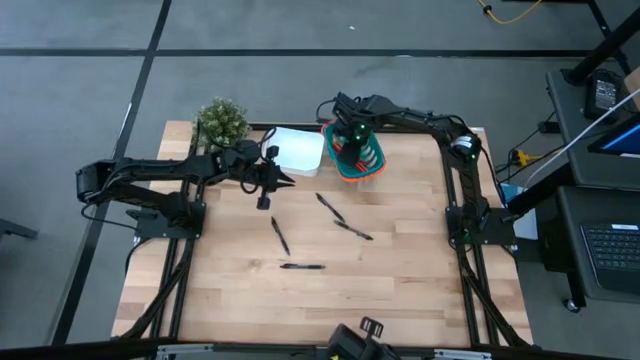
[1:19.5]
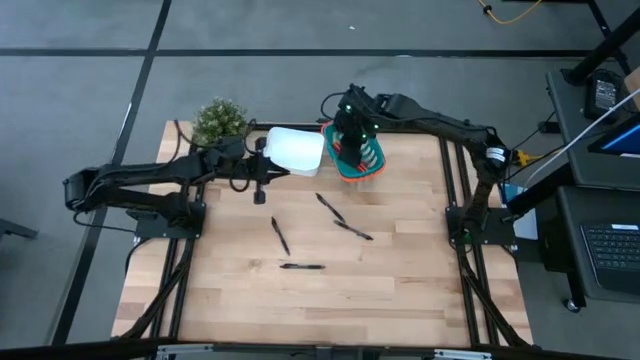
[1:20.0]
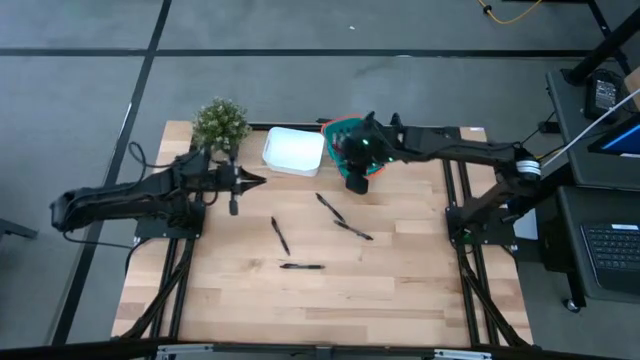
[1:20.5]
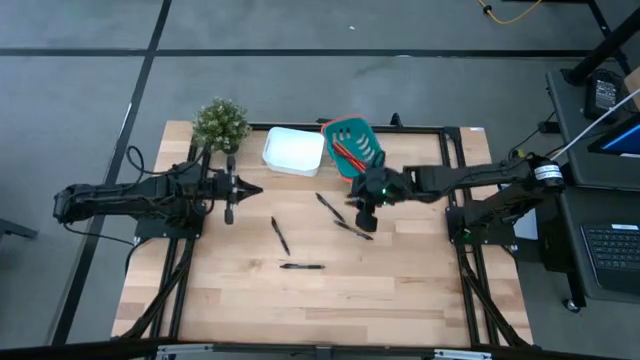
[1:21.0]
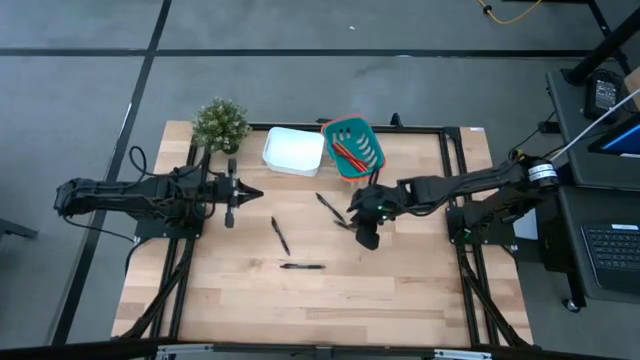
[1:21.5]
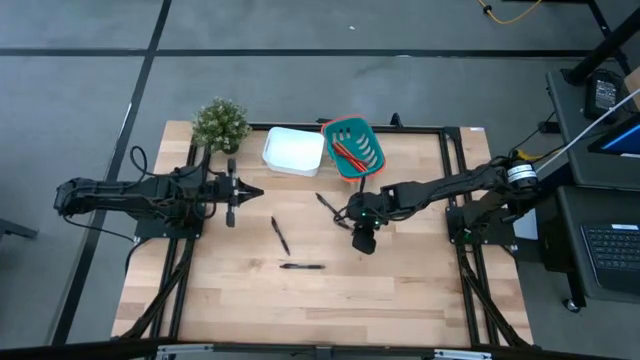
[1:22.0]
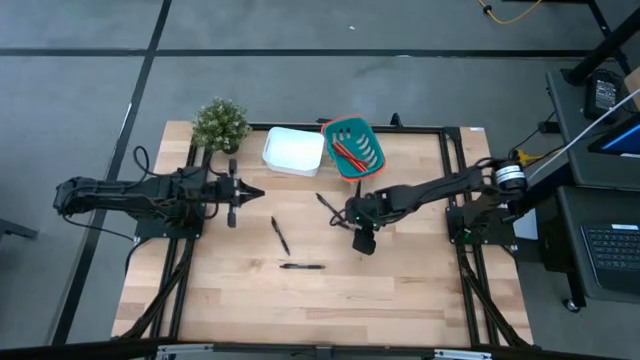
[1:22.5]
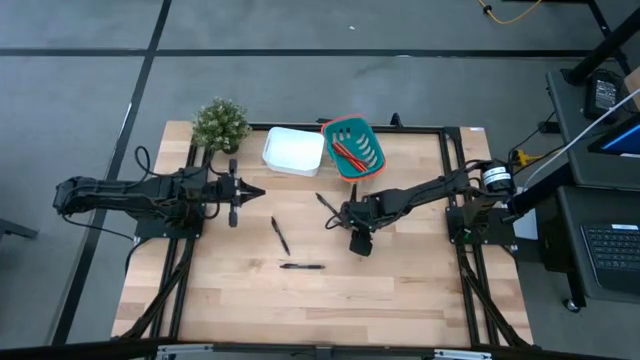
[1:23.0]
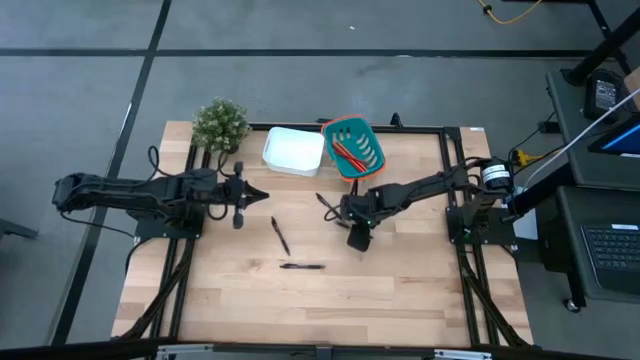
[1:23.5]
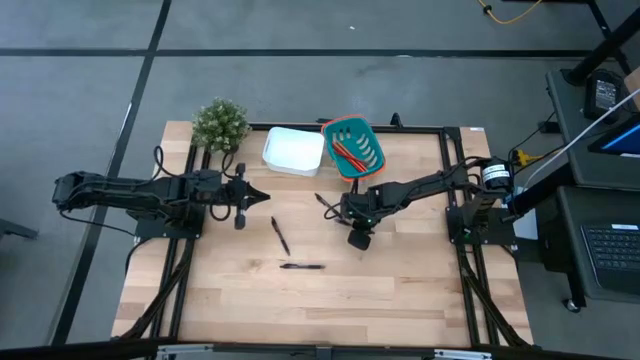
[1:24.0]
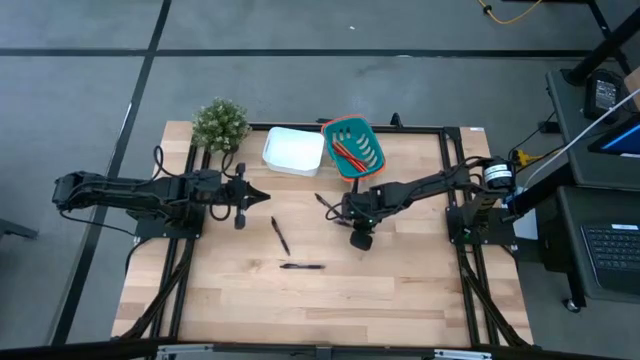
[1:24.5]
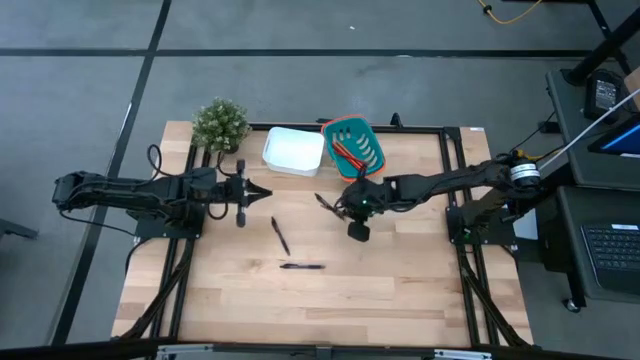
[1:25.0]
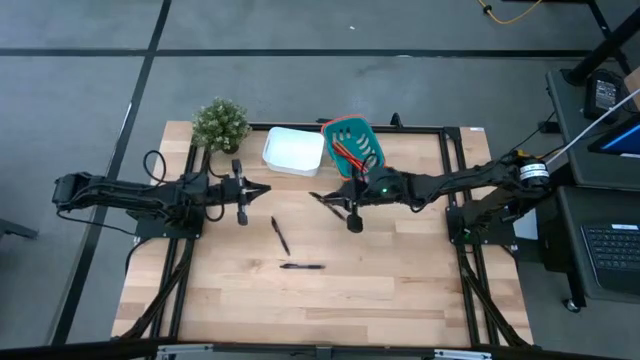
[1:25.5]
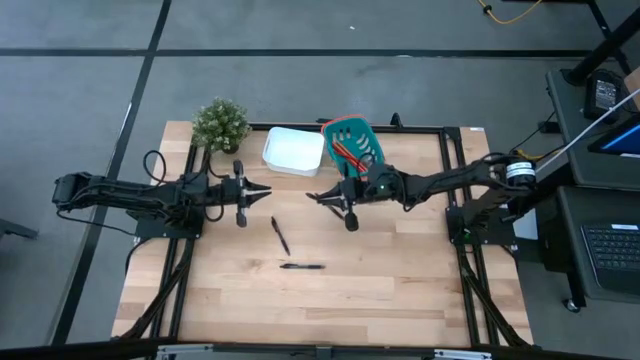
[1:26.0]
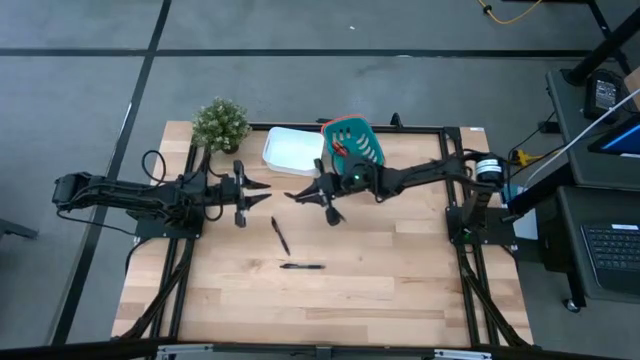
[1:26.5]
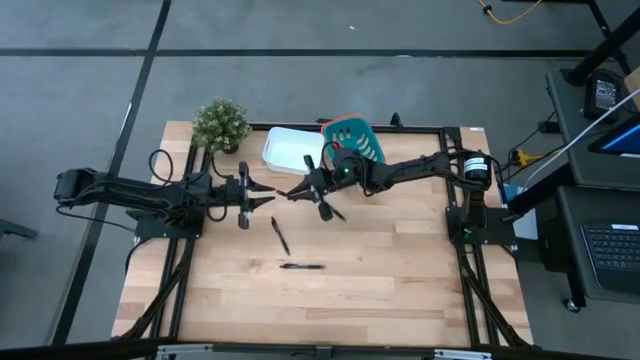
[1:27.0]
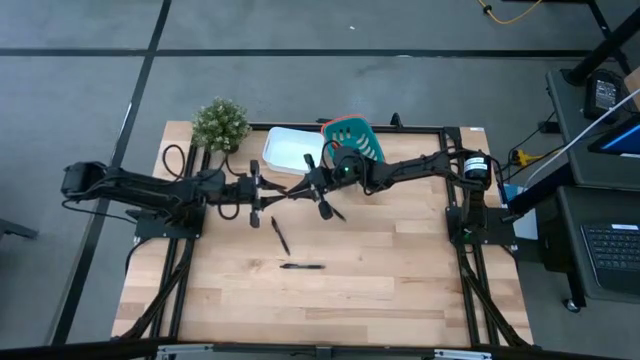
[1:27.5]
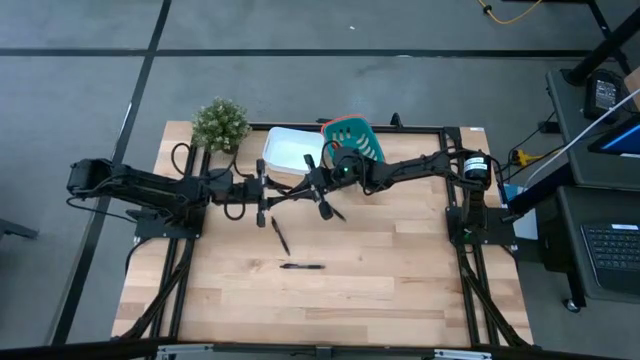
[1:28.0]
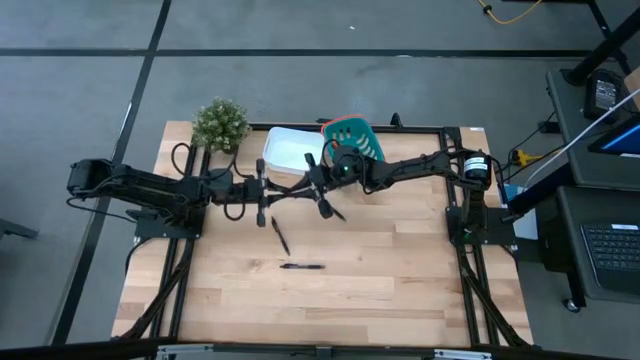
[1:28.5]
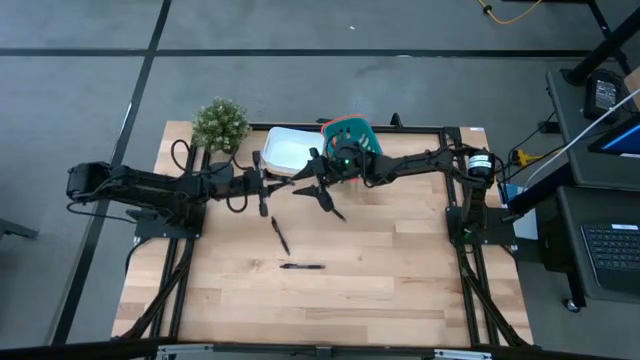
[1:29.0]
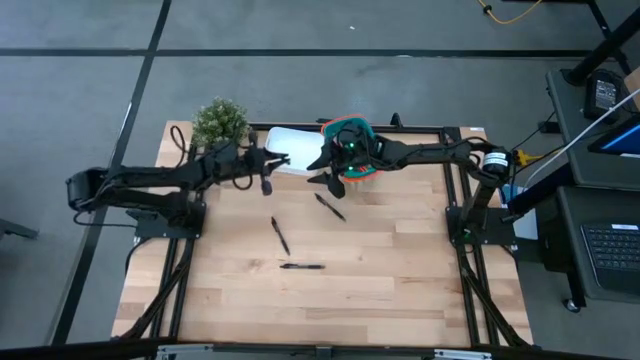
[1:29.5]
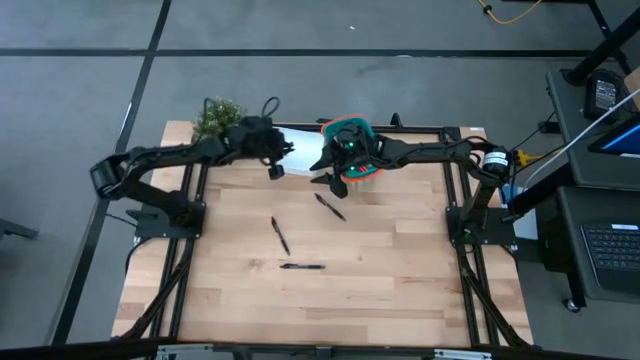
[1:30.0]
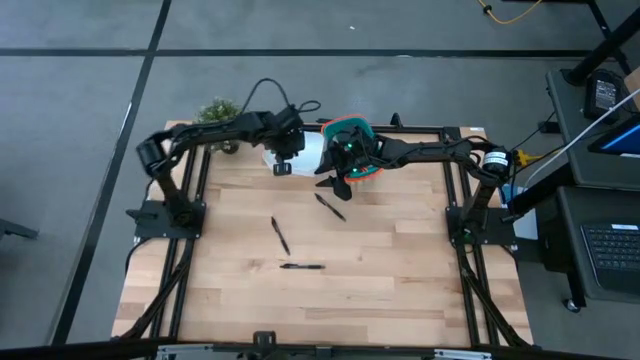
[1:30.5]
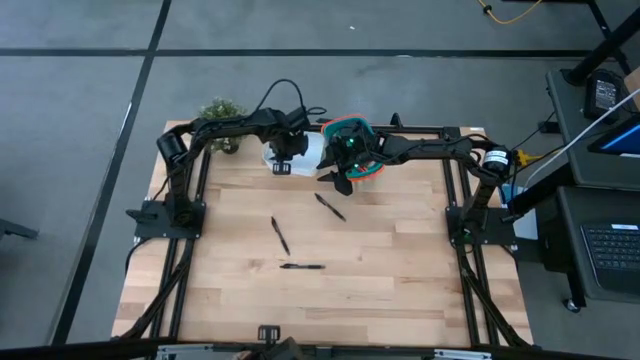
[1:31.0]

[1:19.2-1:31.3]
Task: Sort pens & pencils
Put the bottom right black pen into the white bin

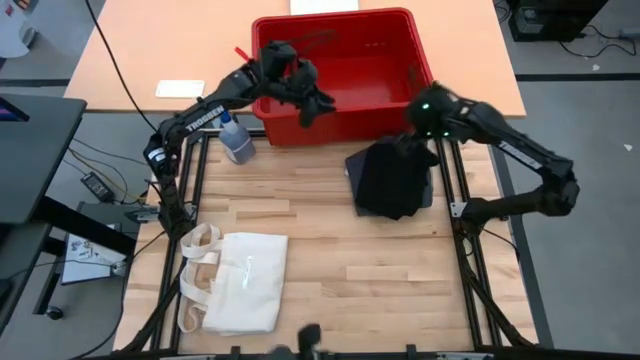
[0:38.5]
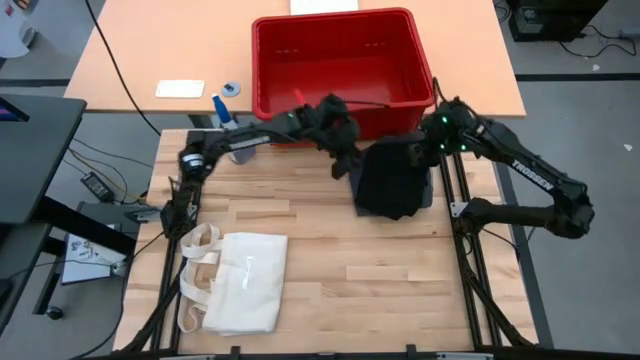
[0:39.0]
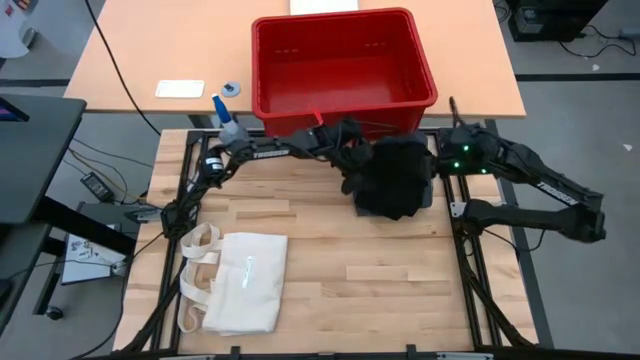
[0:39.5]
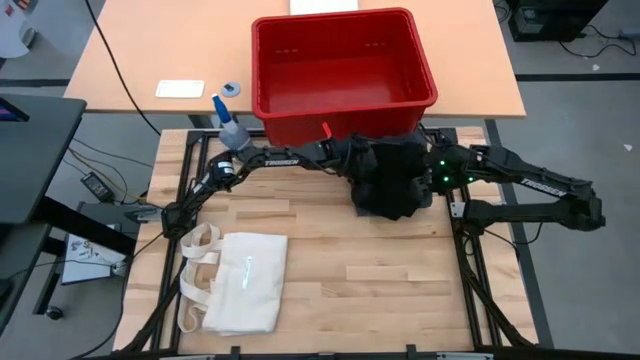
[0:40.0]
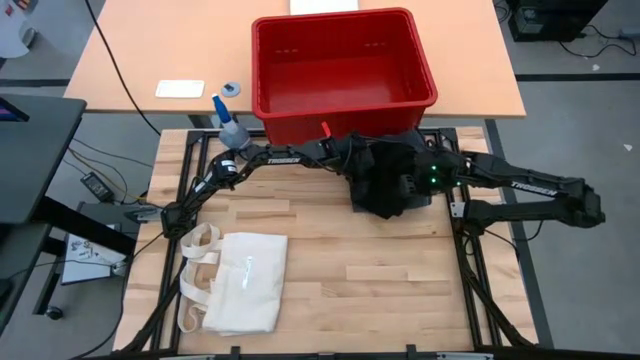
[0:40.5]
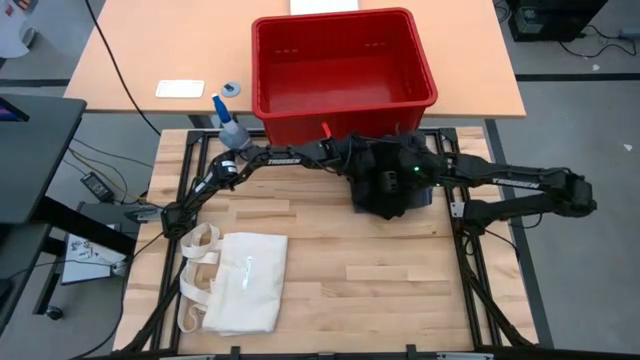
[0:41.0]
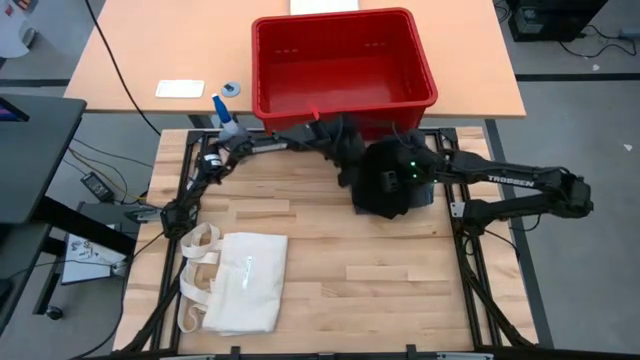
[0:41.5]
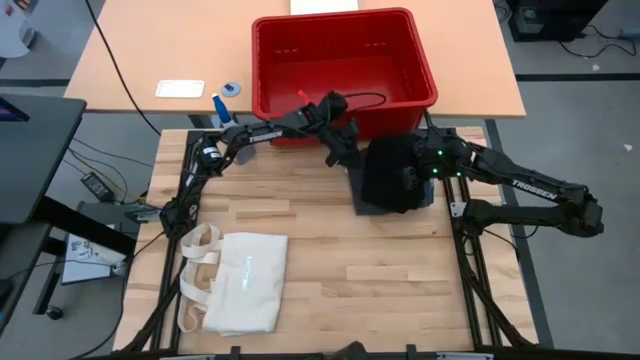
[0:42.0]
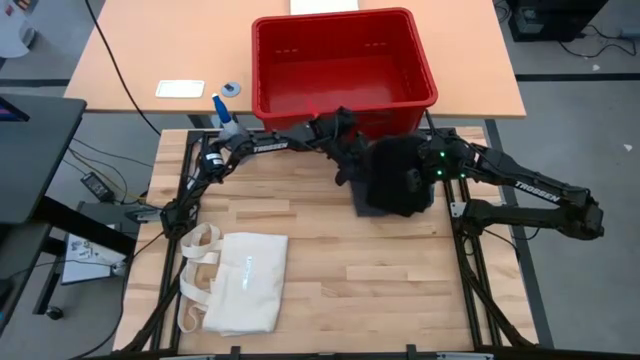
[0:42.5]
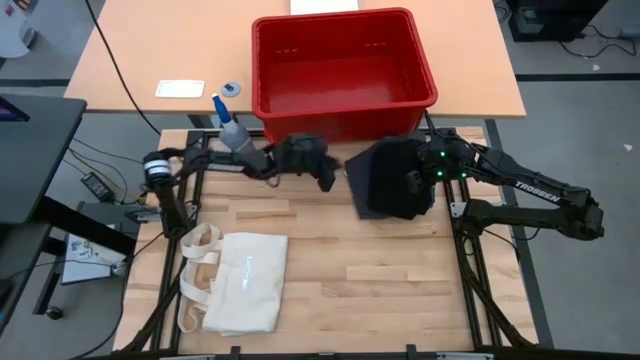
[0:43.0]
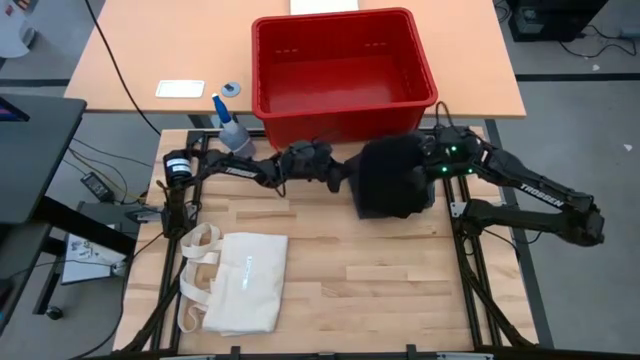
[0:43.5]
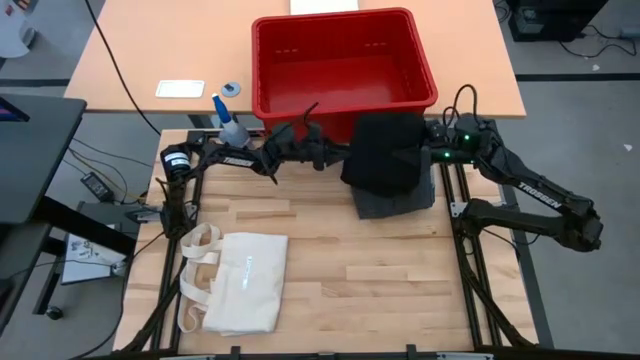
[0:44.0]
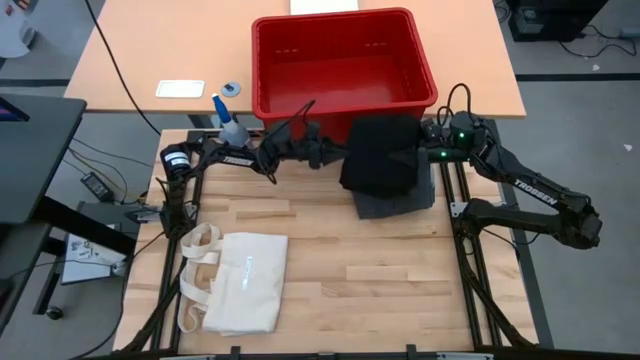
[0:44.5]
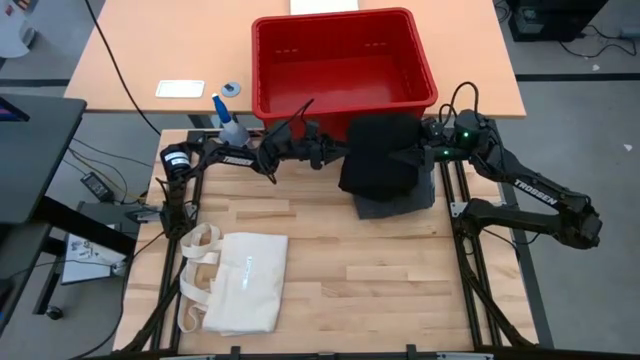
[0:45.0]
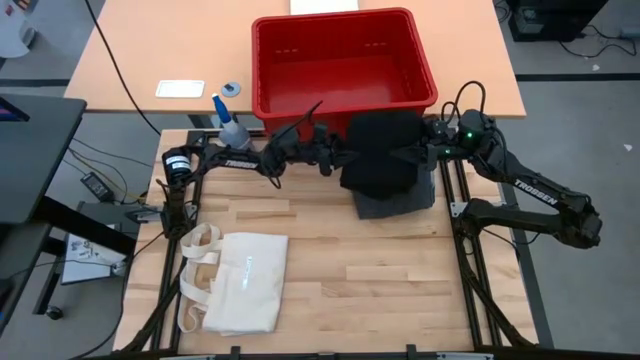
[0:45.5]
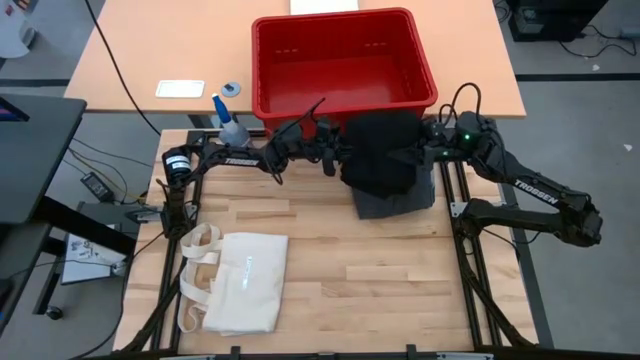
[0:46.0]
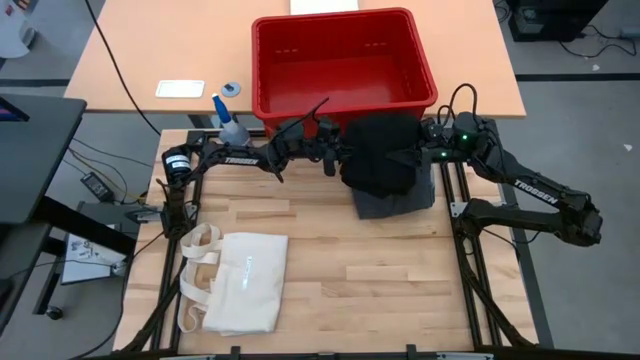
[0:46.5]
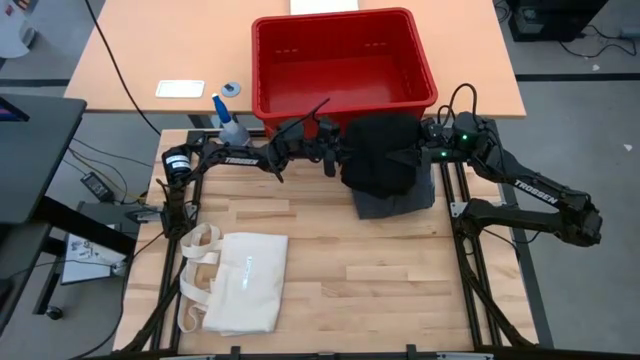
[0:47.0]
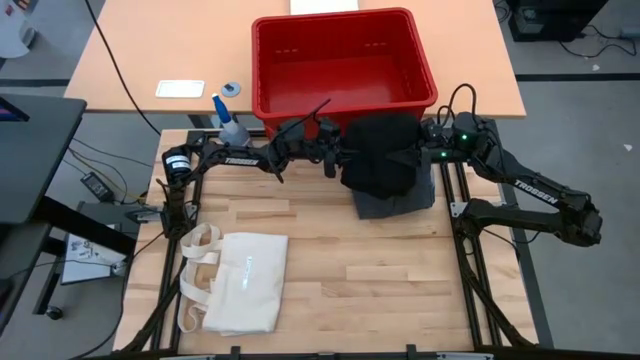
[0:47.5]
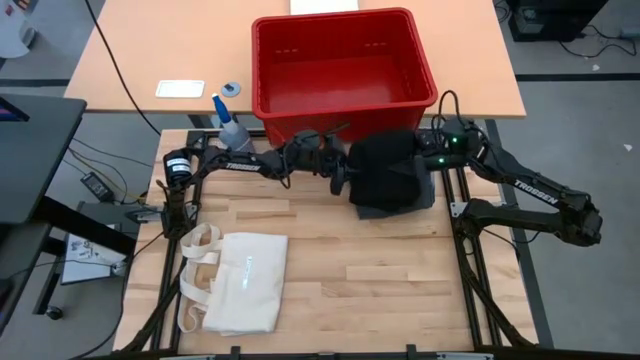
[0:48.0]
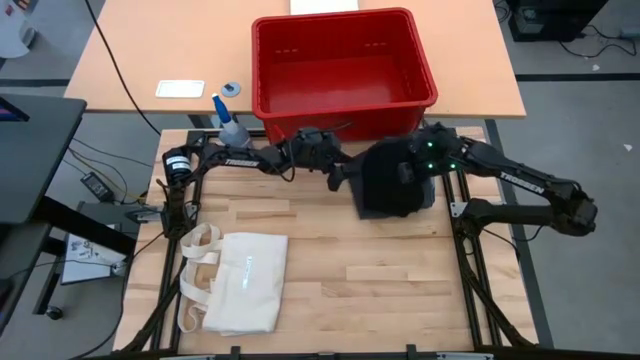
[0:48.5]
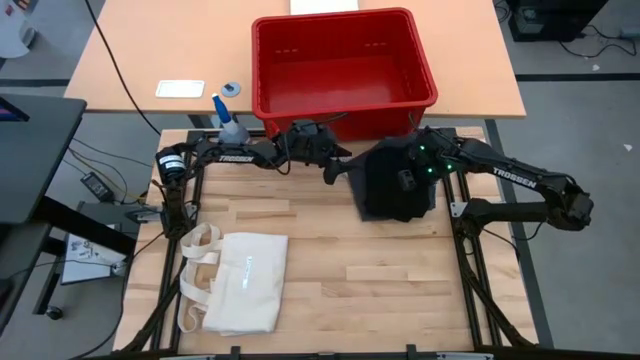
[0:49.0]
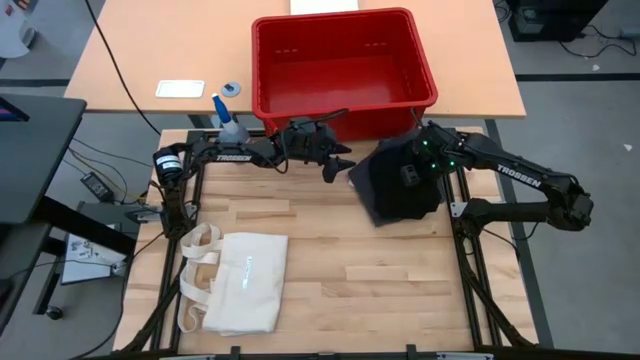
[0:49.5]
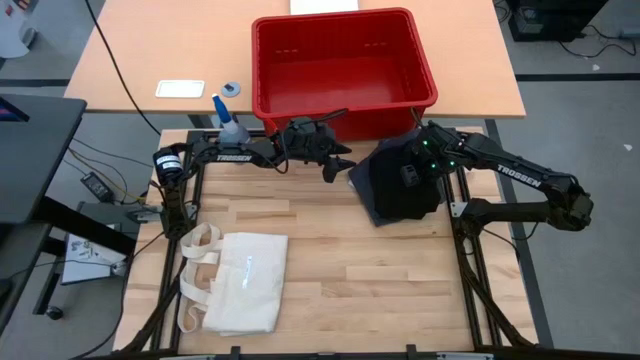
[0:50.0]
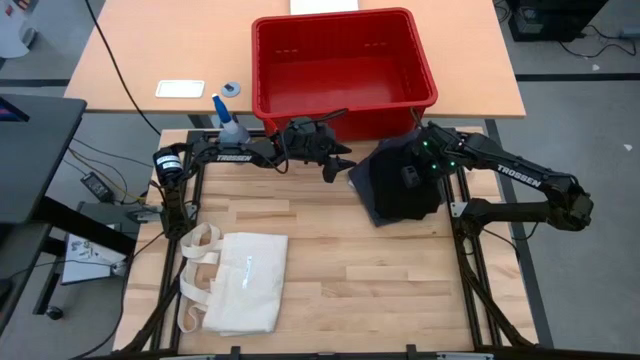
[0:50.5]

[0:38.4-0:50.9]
Task: Fold laundry
Put the folded black pants into the red bin
